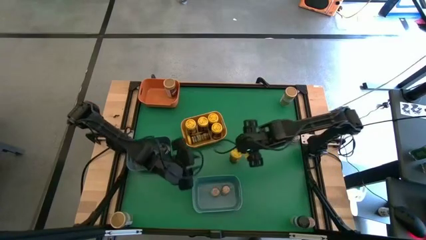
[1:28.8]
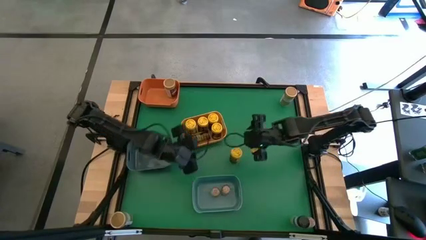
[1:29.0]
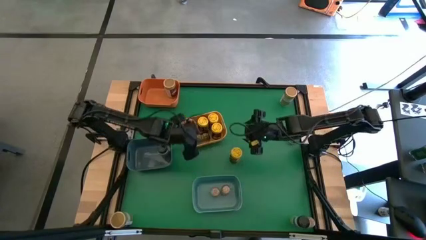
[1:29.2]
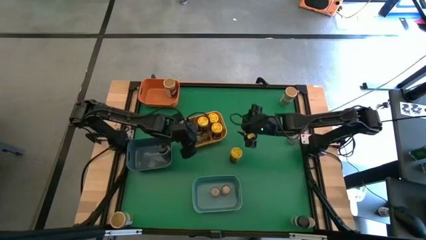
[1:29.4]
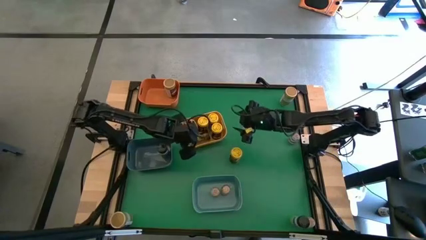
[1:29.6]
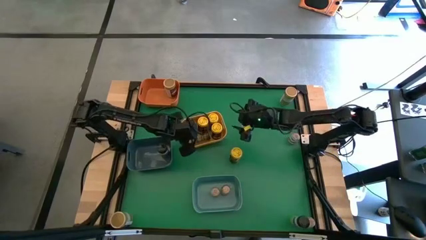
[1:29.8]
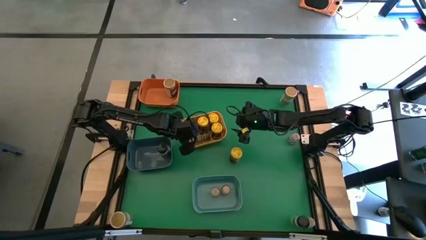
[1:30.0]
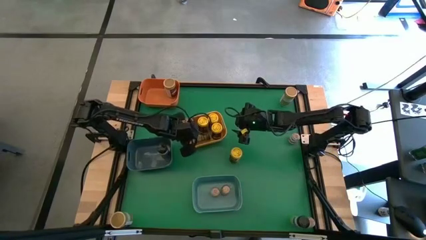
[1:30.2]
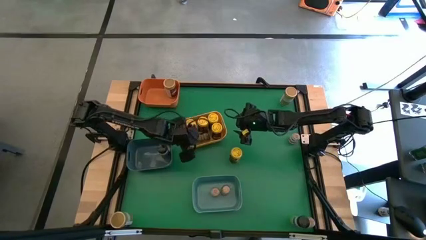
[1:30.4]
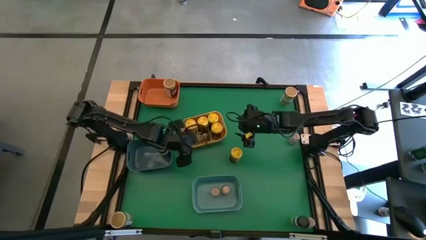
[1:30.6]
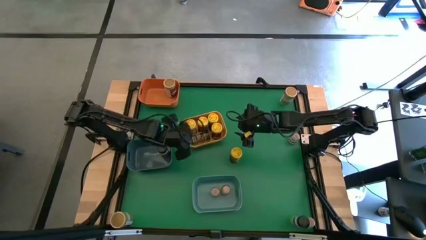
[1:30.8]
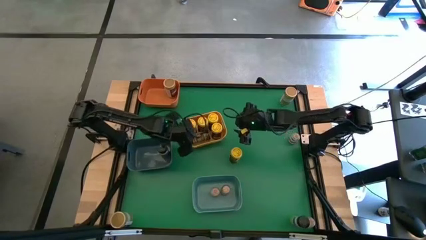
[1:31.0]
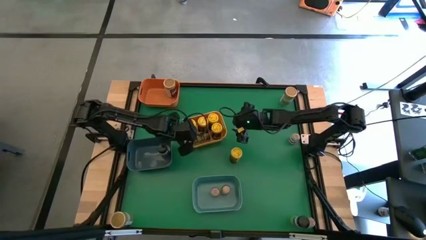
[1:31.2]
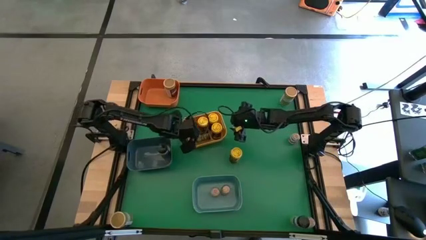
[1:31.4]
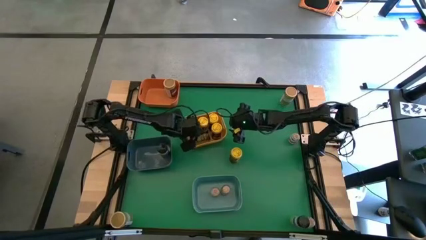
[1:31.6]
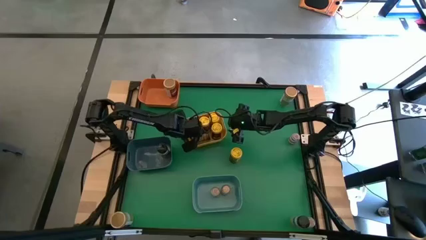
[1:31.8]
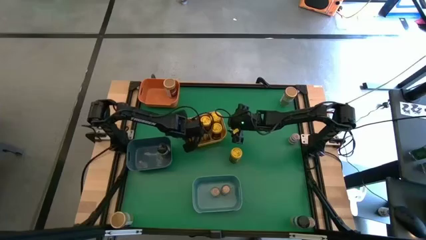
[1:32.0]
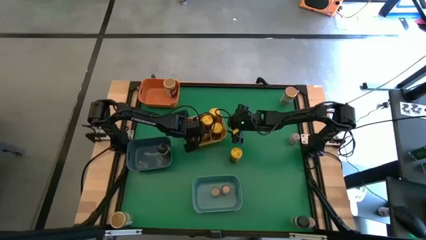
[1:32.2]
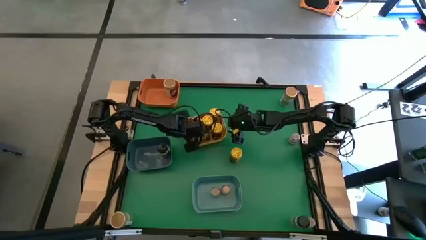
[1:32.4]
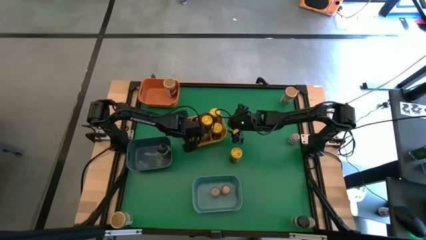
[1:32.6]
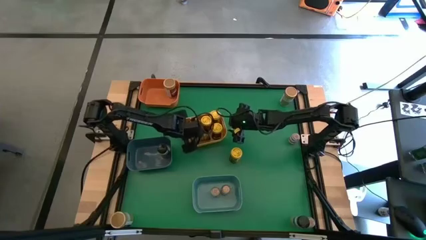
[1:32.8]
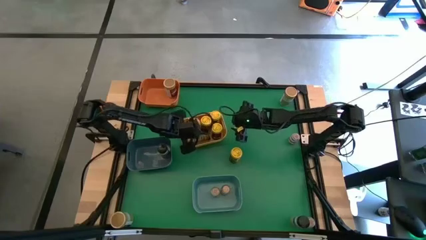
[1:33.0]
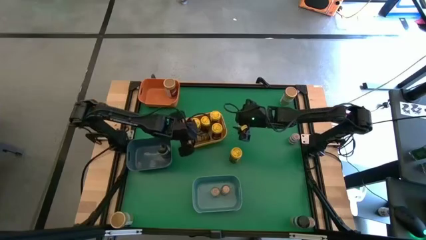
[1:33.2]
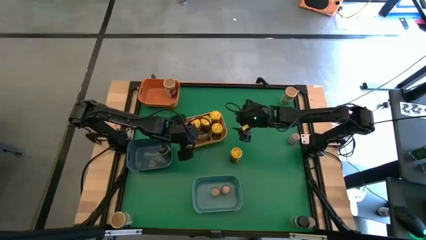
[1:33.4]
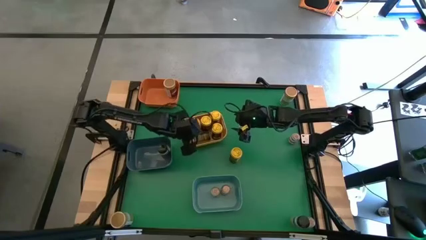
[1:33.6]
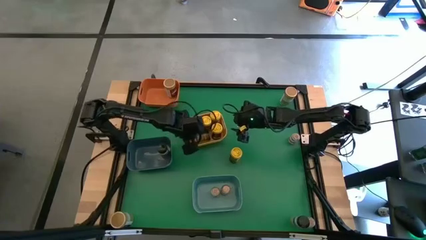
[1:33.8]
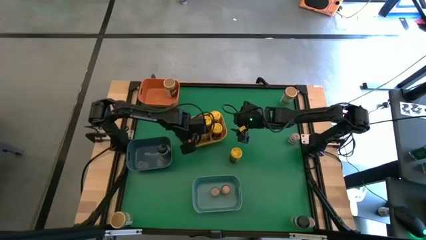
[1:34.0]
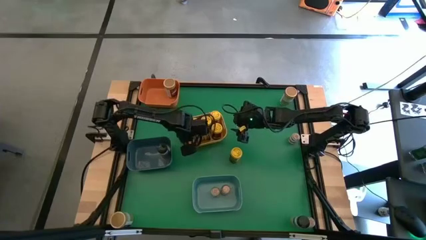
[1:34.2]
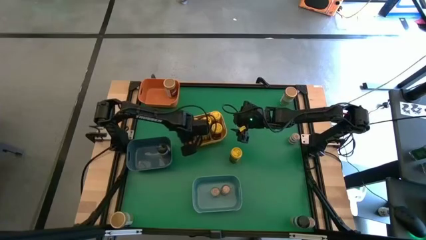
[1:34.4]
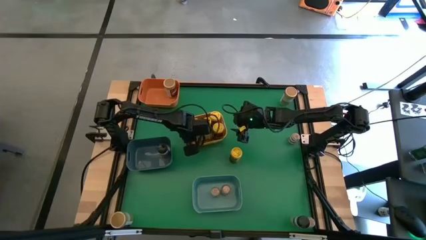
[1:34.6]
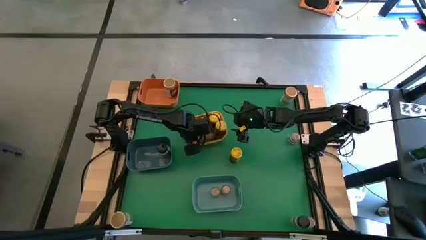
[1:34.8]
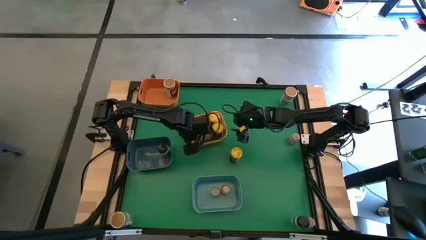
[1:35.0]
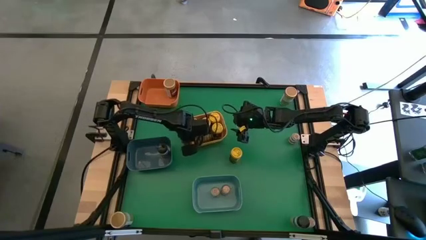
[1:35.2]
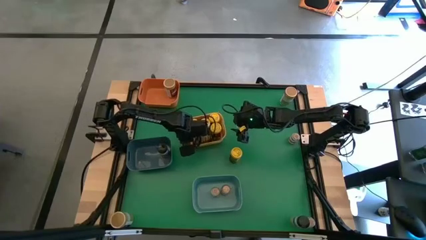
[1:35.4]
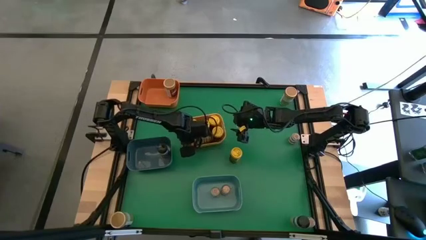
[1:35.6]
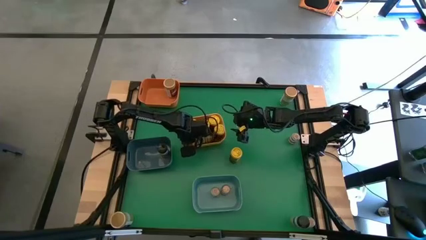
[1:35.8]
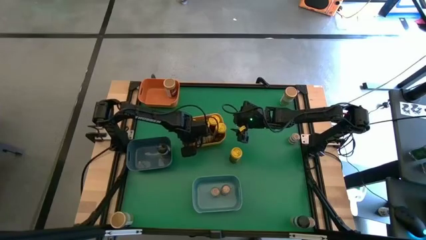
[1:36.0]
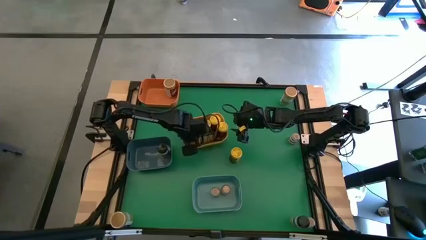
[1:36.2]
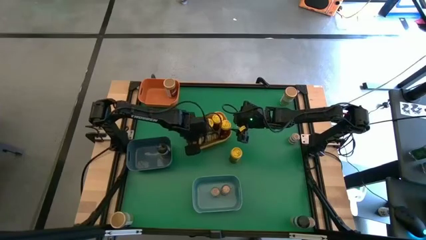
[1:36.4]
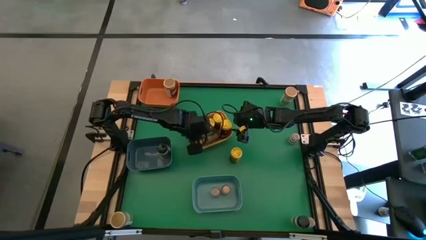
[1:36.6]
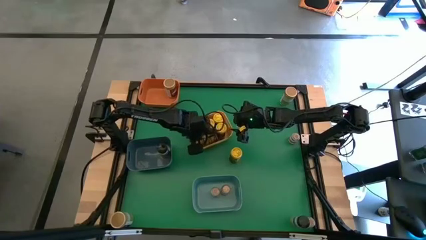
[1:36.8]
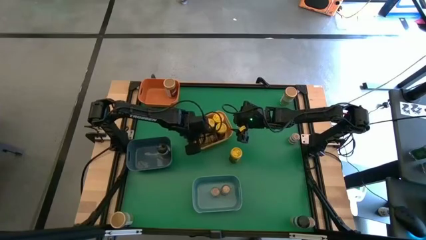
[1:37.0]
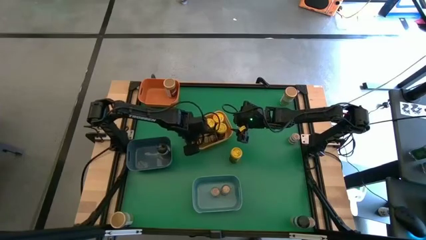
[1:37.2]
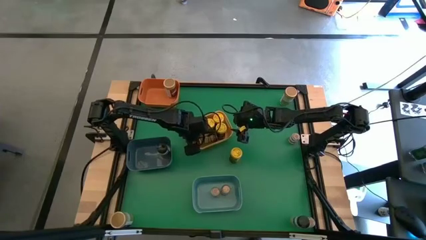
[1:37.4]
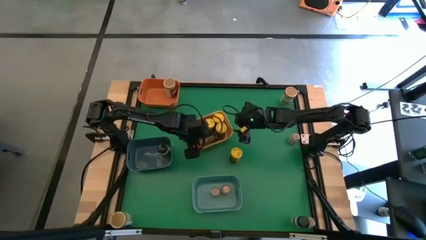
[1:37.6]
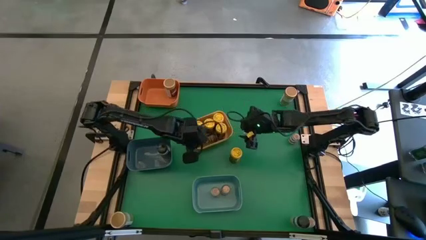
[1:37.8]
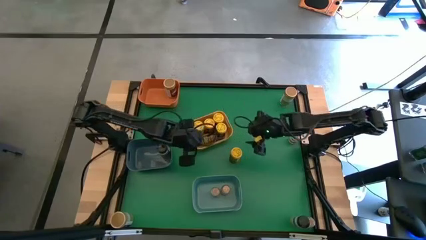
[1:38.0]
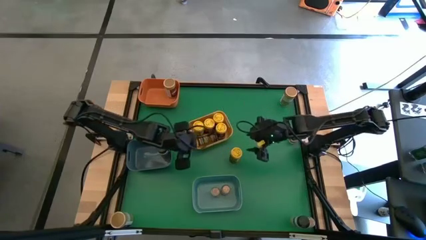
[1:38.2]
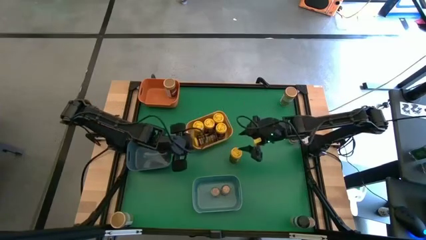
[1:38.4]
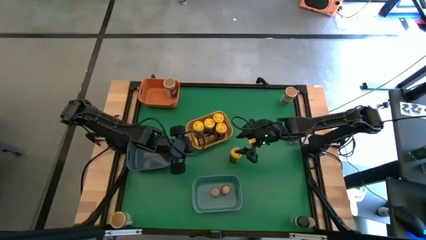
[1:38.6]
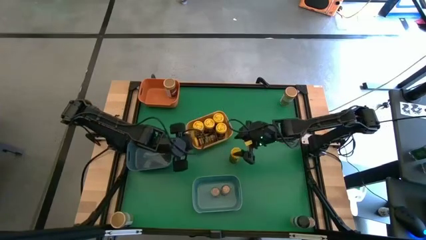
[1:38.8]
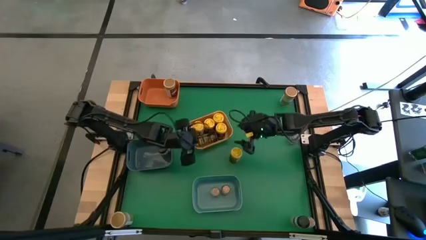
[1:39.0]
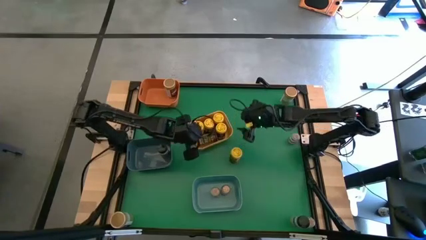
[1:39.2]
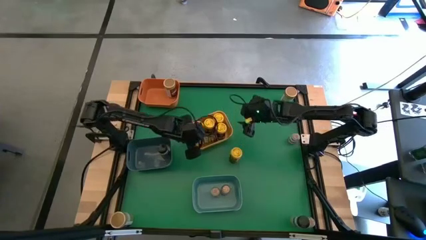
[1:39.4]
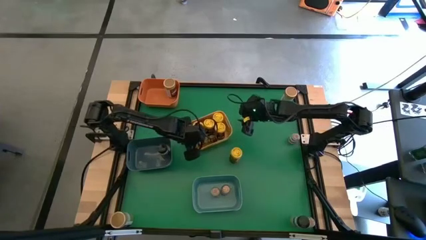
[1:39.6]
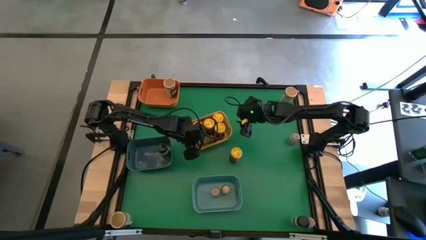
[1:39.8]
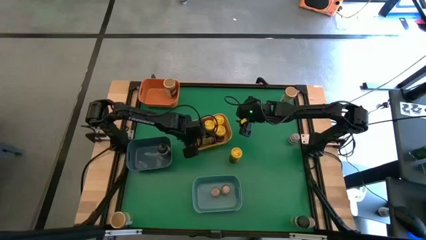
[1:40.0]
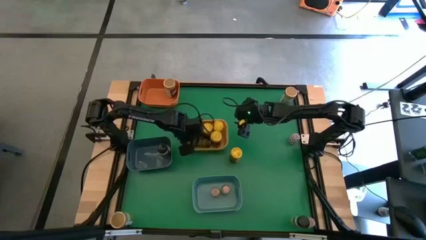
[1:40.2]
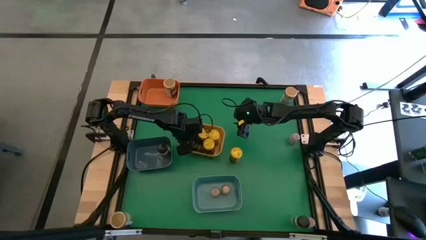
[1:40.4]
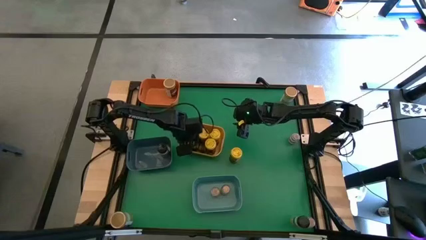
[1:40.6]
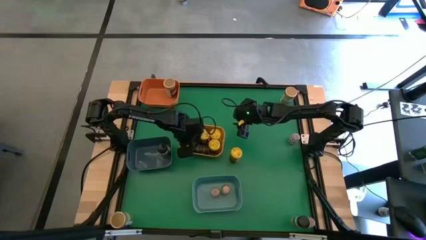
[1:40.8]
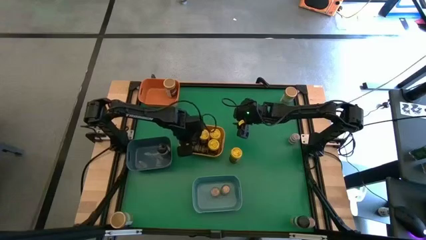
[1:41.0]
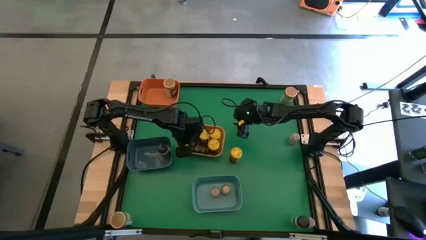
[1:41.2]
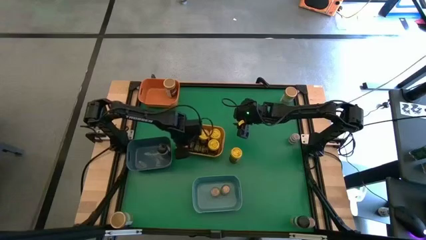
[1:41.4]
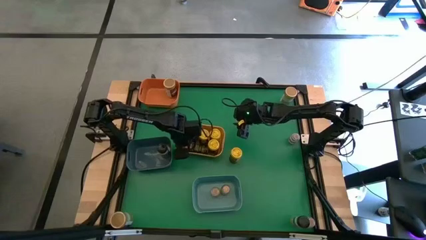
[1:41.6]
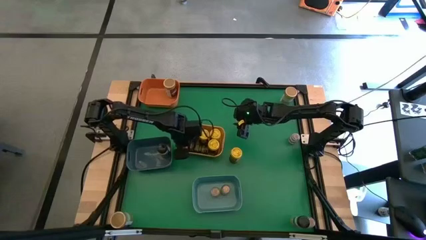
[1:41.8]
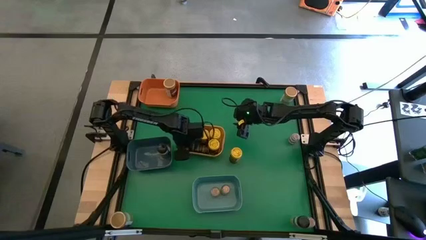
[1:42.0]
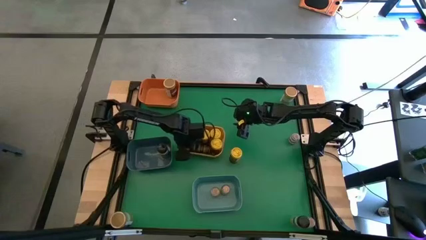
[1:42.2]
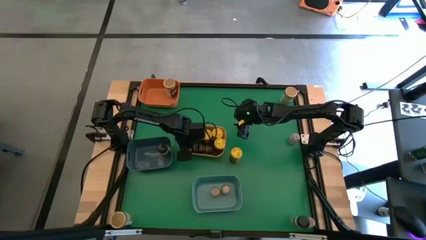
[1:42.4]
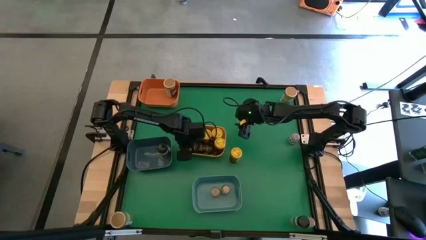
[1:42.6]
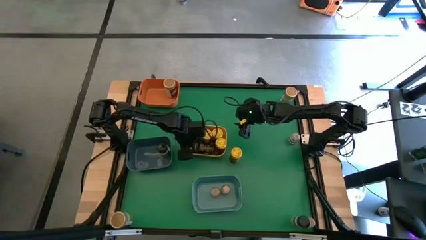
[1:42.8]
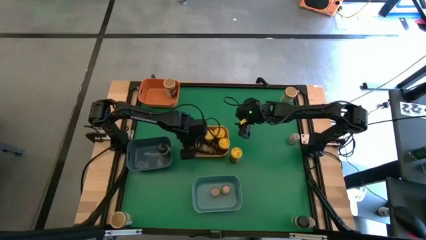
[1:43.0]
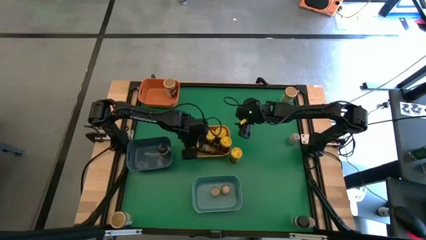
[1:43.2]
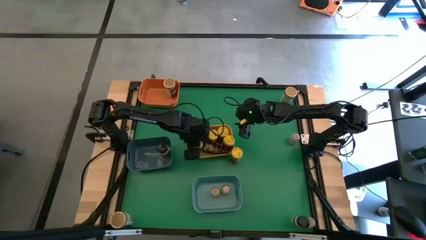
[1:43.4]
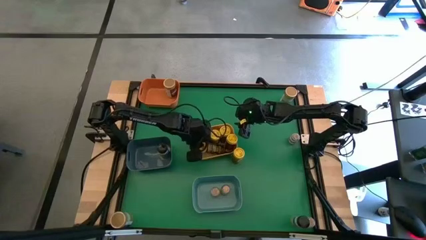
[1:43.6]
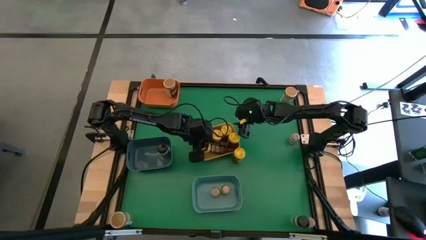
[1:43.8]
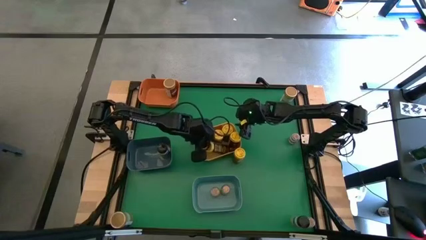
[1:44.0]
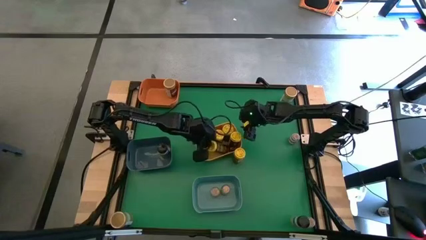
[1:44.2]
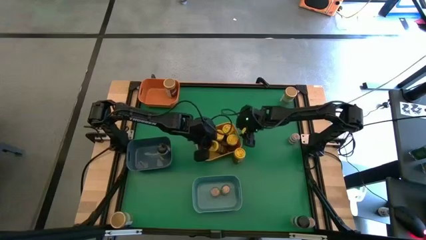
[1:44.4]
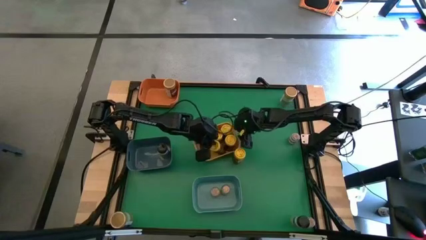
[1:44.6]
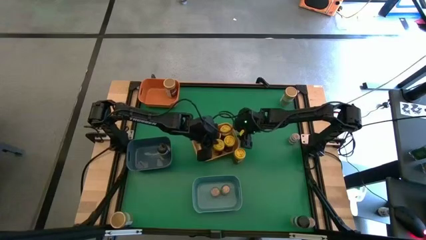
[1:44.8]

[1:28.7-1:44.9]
Task: Sort spices by type
Adjust the yellow seasoning bottle into the yellow bin
